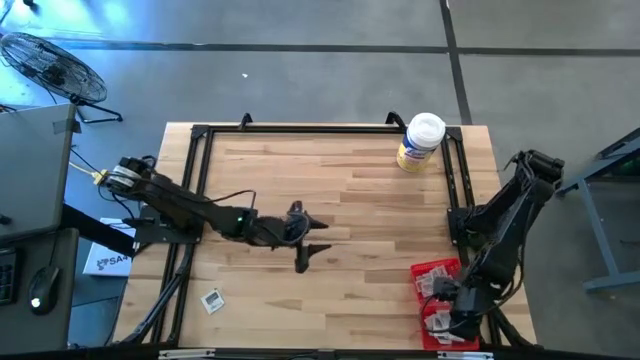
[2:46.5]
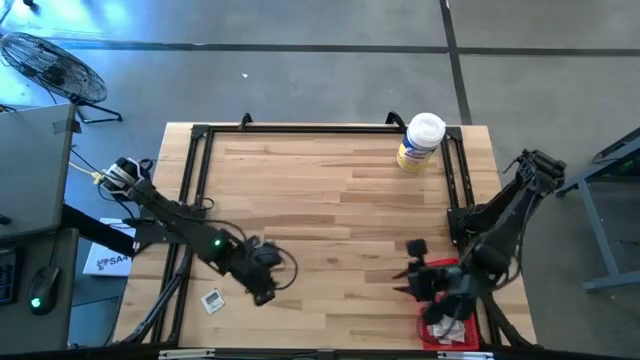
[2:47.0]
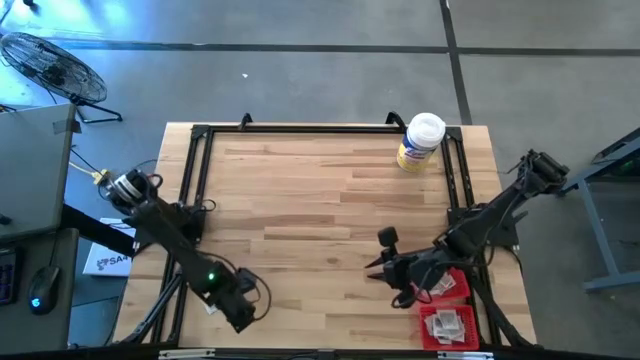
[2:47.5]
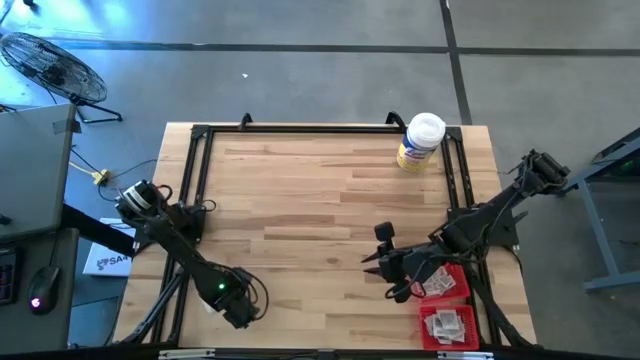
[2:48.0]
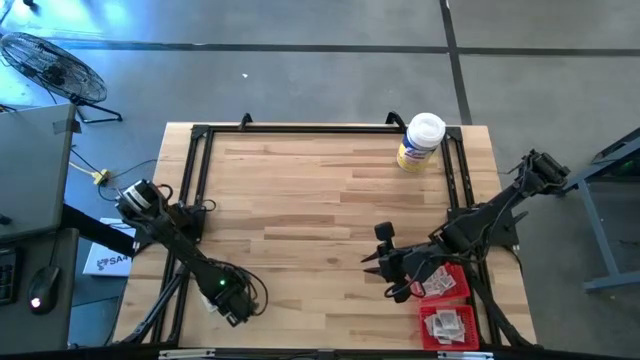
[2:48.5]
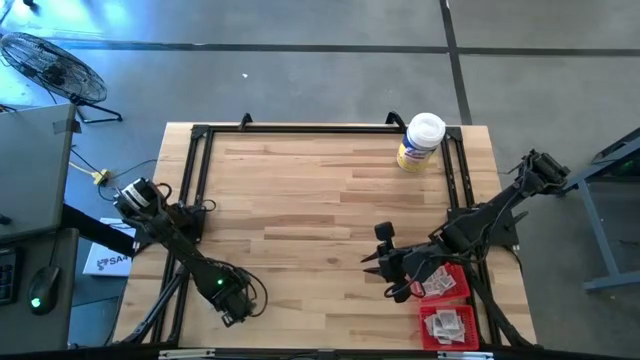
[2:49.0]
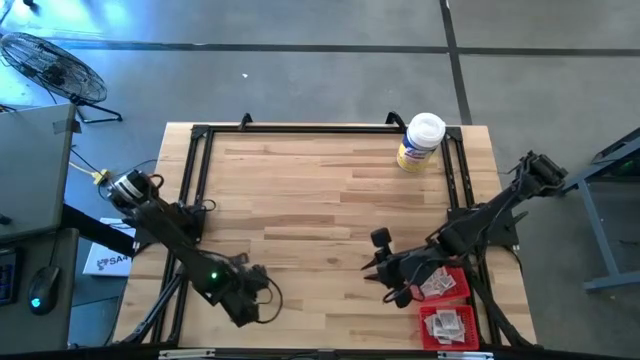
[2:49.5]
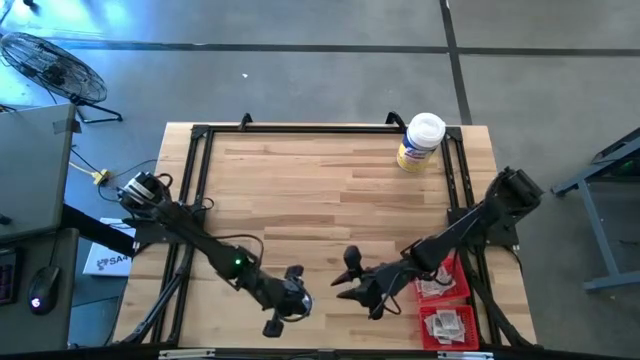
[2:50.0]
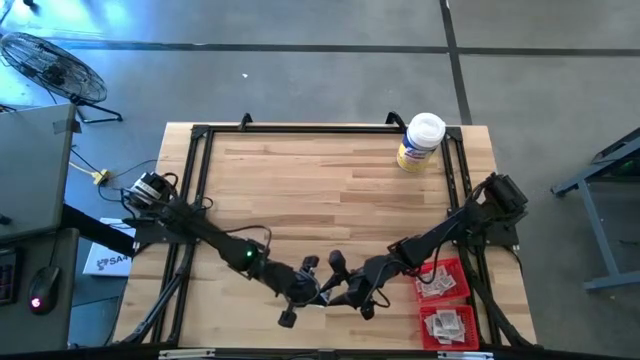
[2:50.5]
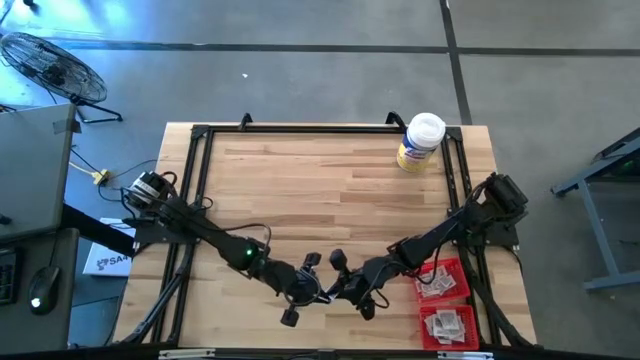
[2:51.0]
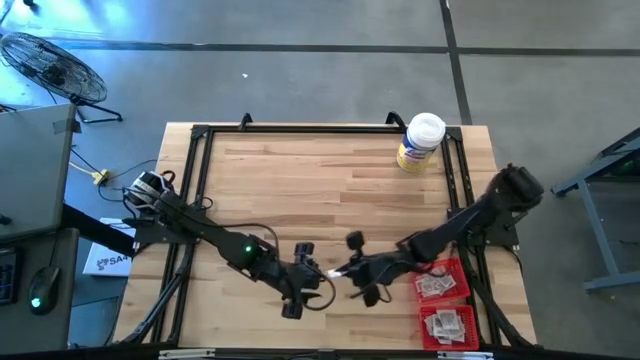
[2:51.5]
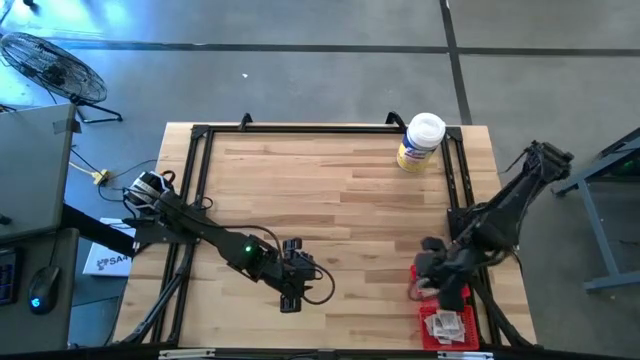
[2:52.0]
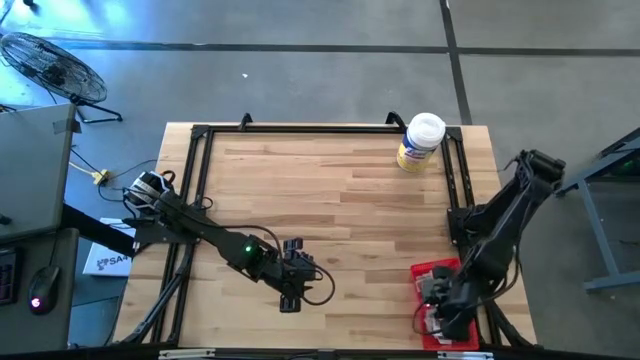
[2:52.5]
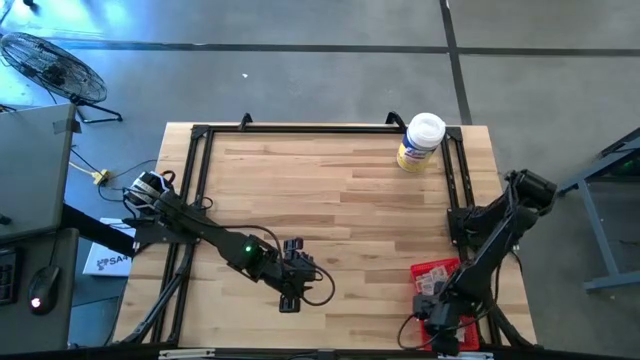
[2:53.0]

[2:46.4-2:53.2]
Task: Pick & Place First Aid Supplies
Put the white towelette pack into the bottom red bin

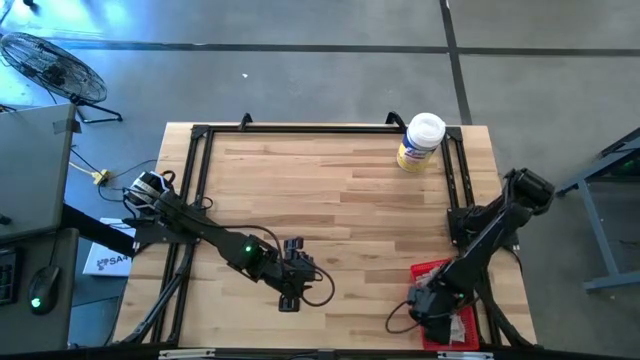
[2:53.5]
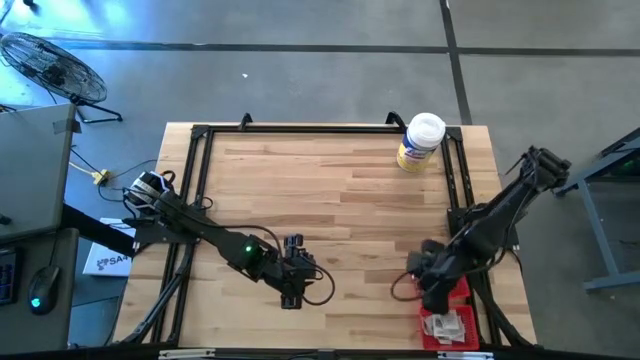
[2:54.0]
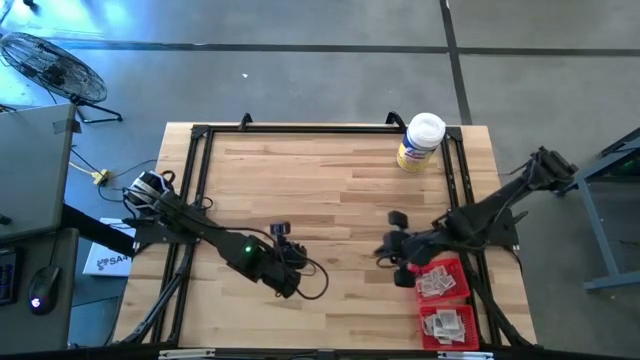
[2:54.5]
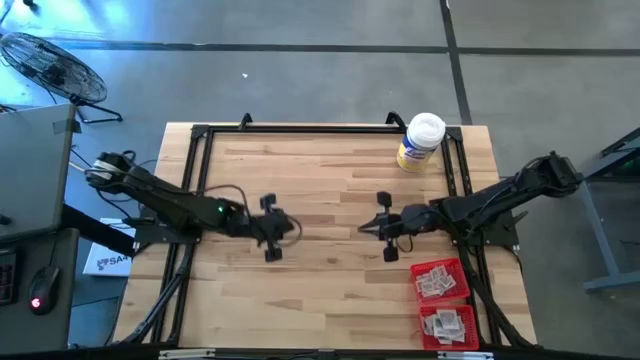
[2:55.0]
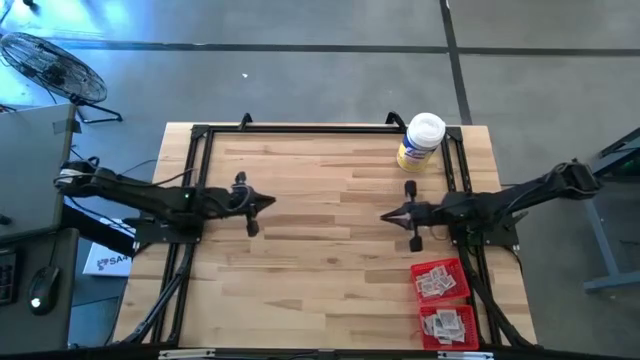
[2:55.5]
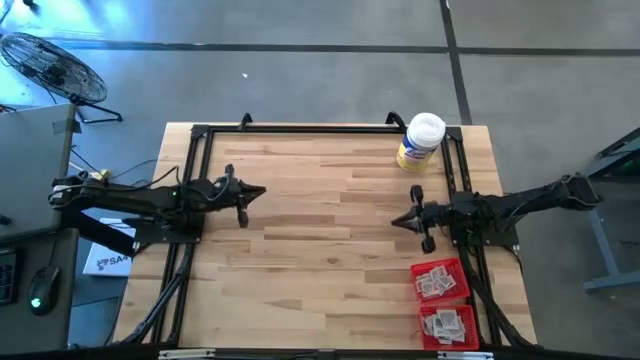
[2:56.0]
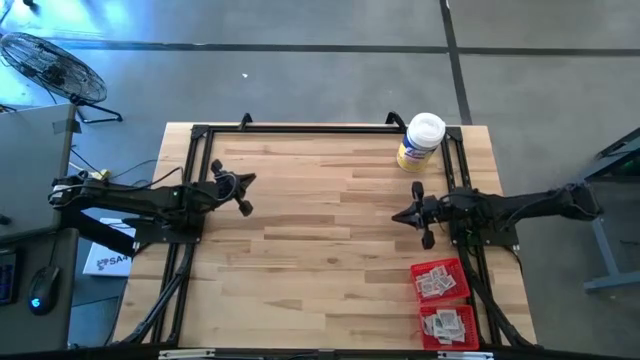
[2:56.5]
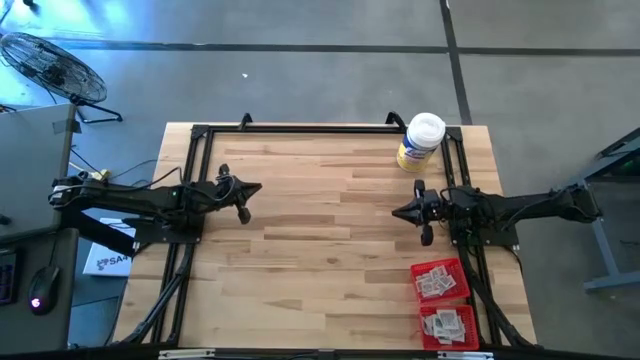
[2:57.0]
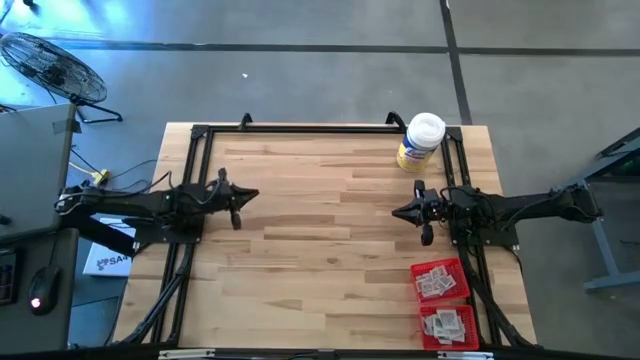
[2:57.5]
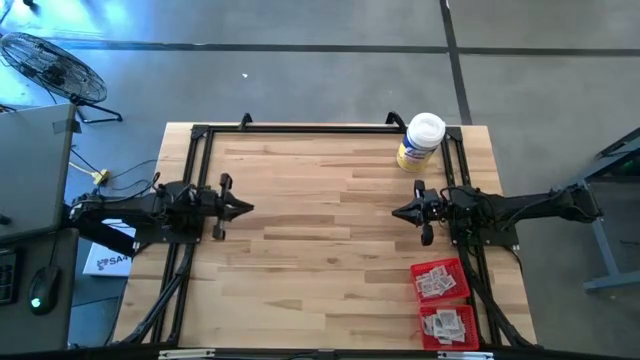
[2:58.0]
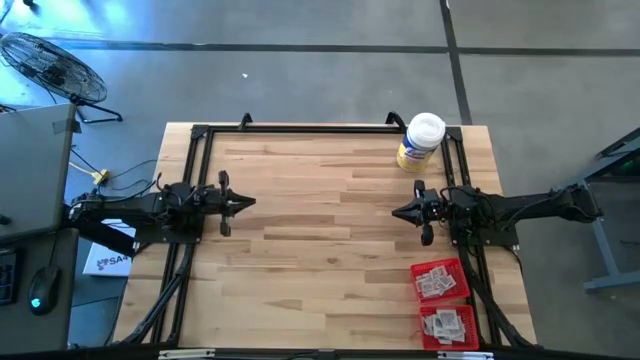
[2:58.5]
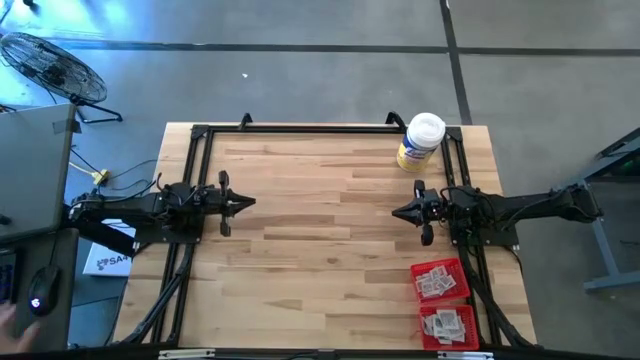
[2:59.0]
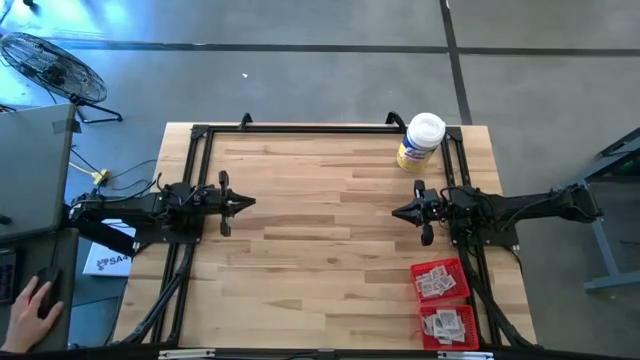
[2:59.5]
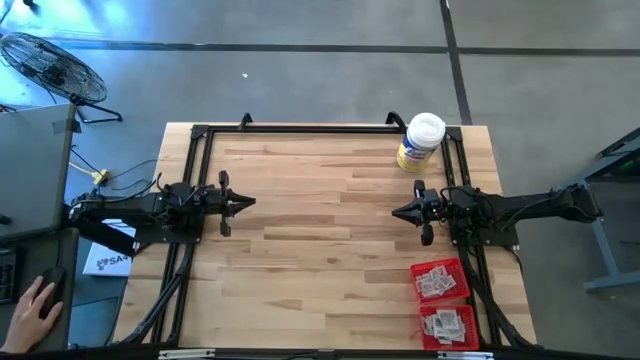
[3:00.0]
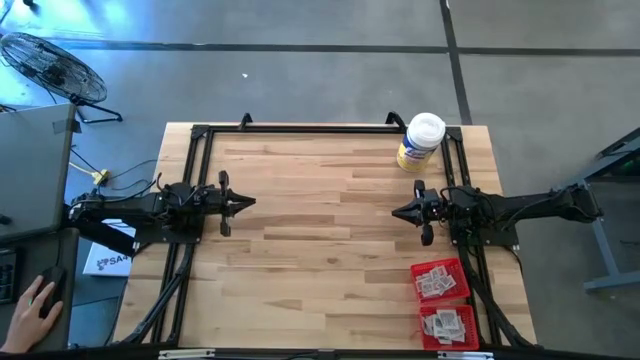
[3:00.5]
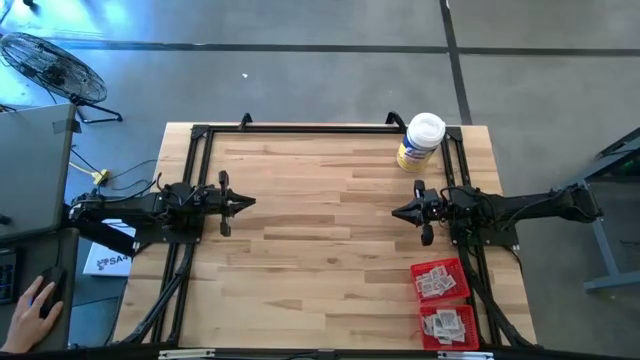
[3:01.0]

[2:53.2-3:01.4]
Return to Home Position

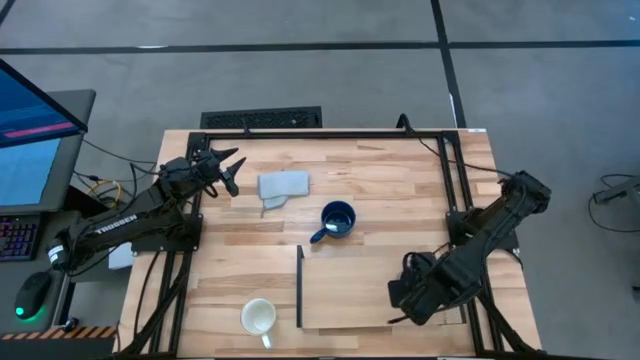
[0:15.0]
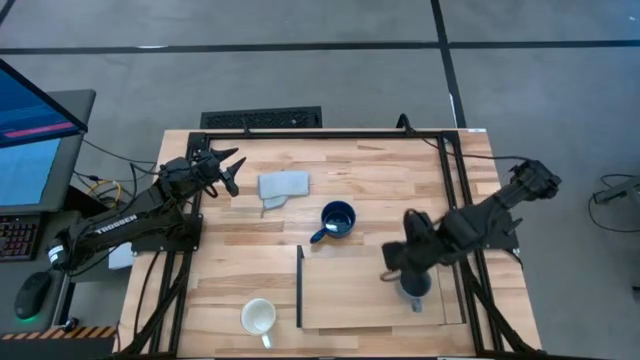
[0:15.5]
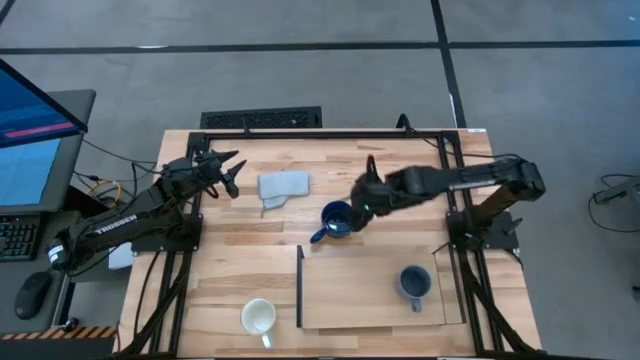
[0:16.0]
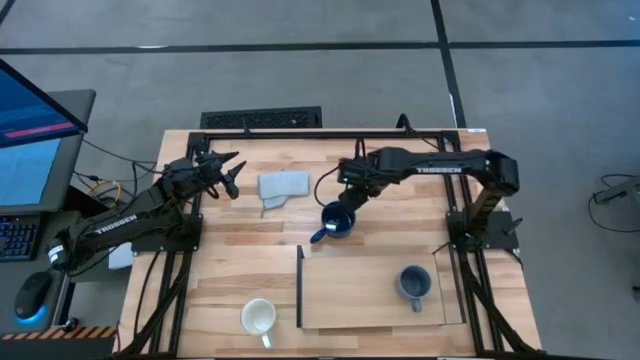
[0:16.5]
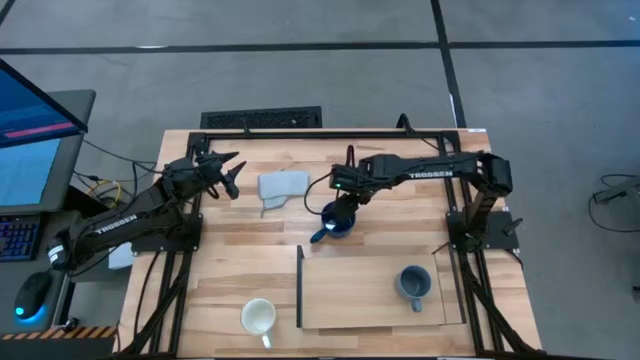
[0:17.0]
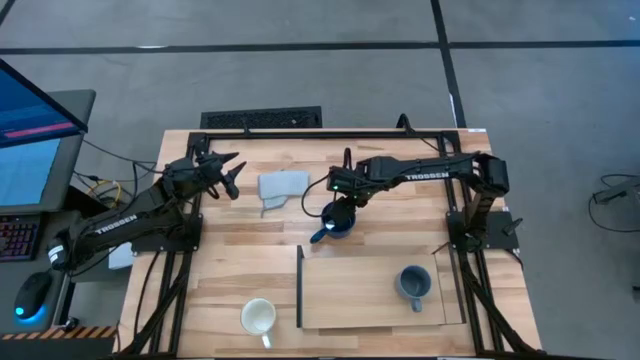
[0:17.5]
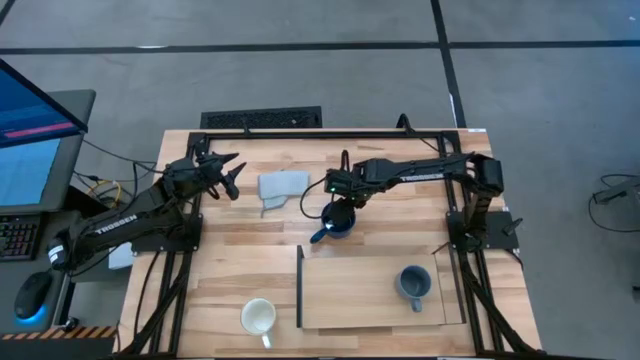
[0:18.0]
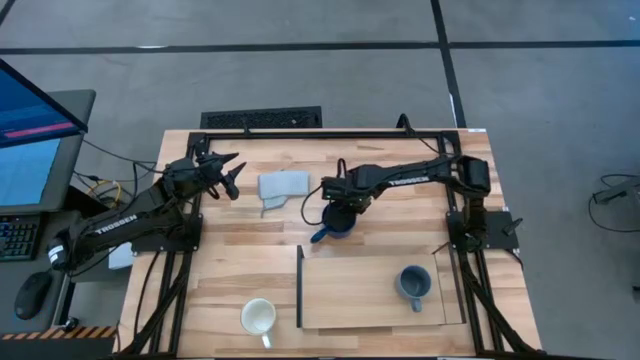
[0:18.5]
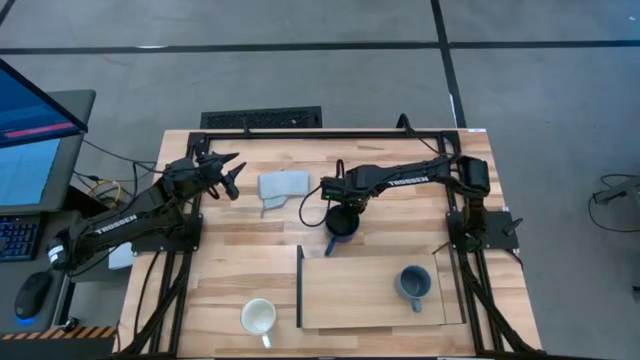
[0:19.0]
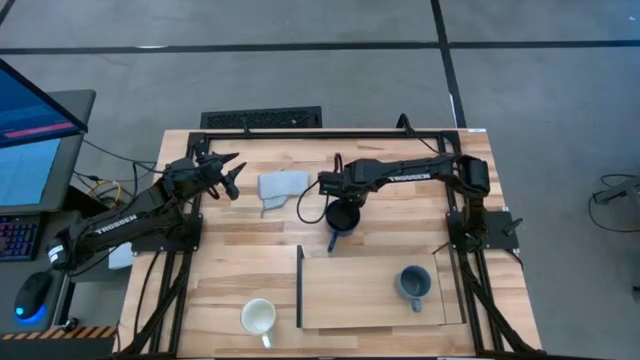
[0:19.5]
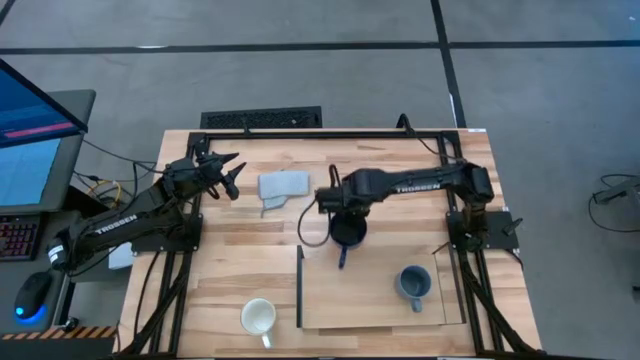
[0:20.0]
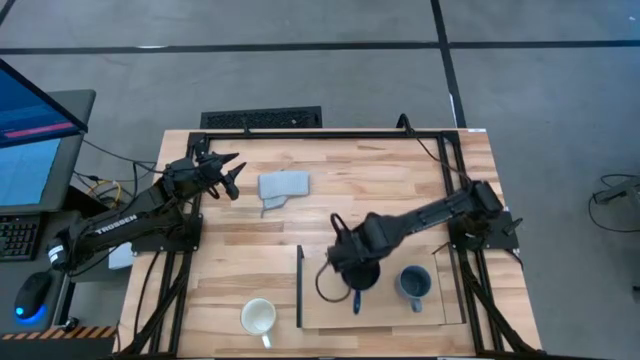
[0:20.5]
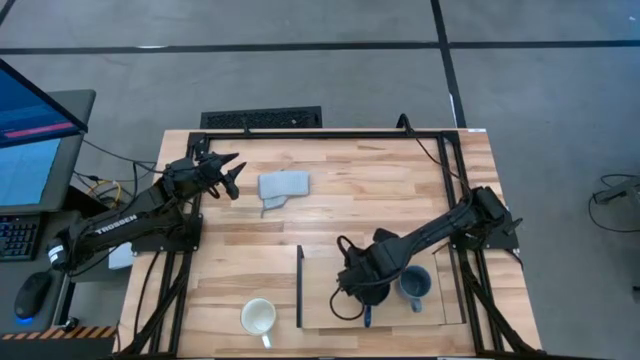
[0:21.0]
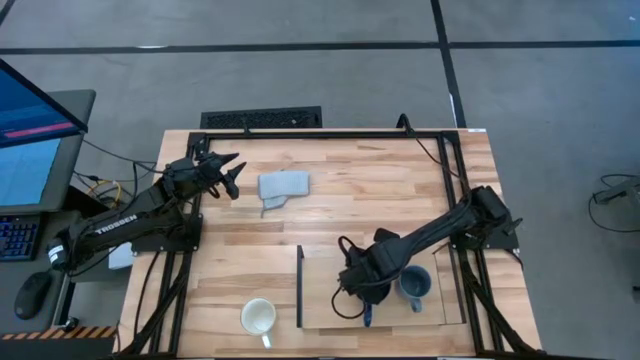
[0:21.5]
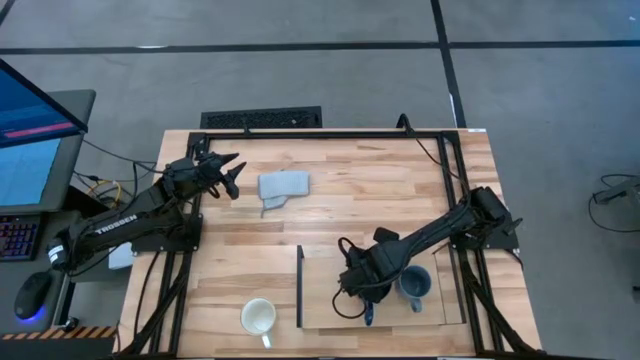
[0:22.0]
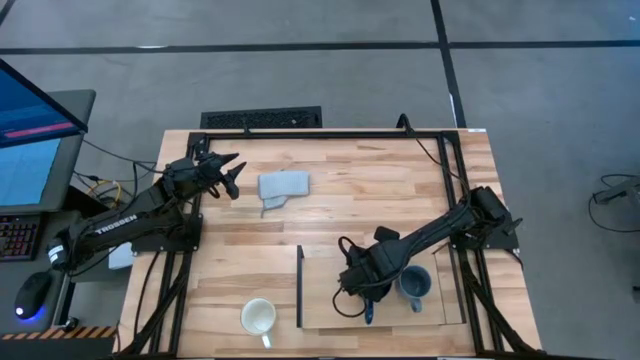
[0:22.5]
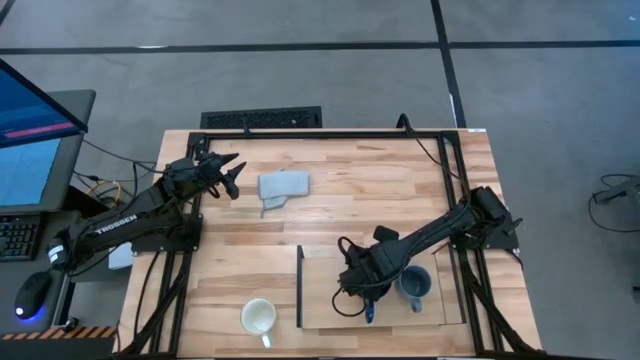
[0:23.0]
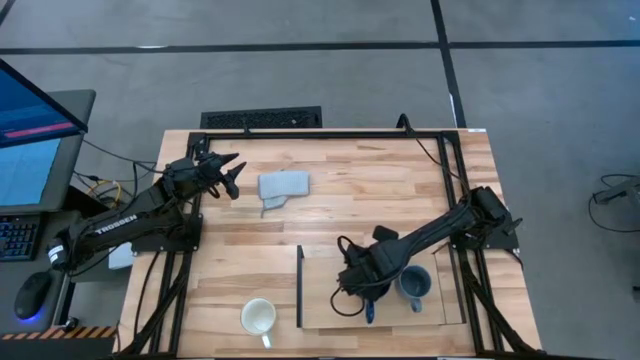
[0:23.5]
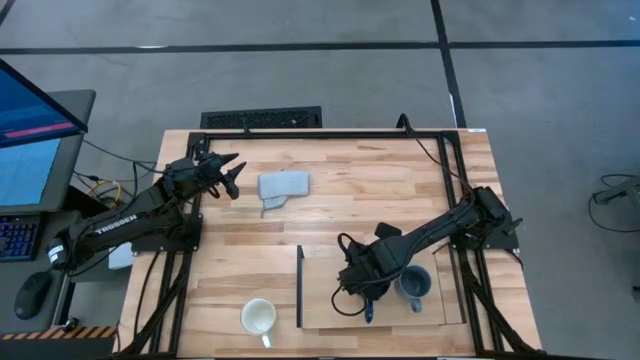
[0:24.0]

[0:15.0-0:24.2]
Task: Stack small to large cups/mugs on shelf
Put the blue mug on the shelf
